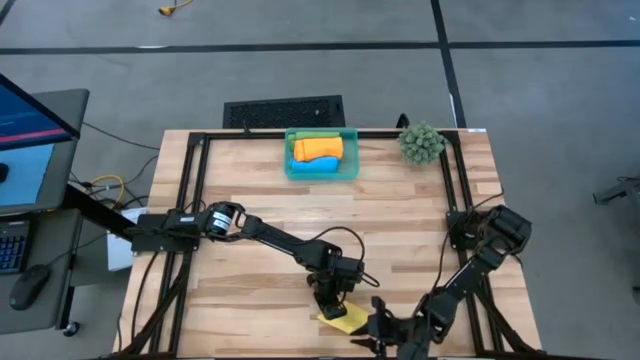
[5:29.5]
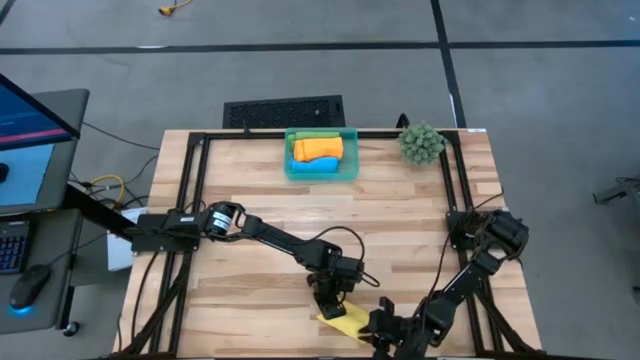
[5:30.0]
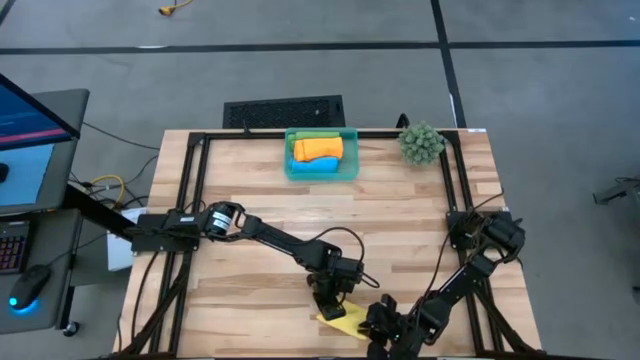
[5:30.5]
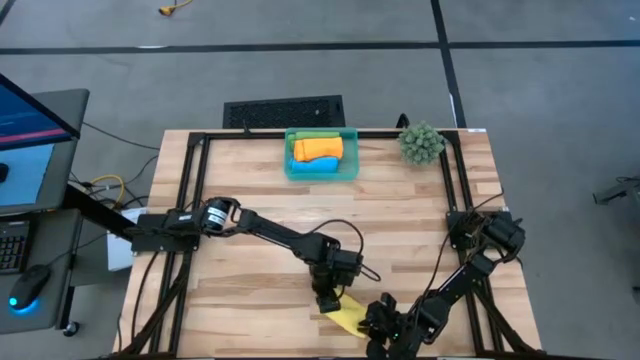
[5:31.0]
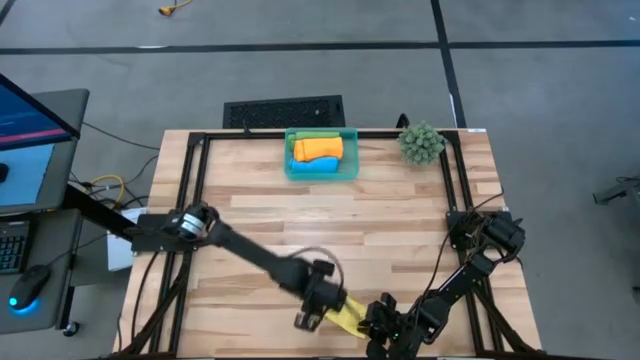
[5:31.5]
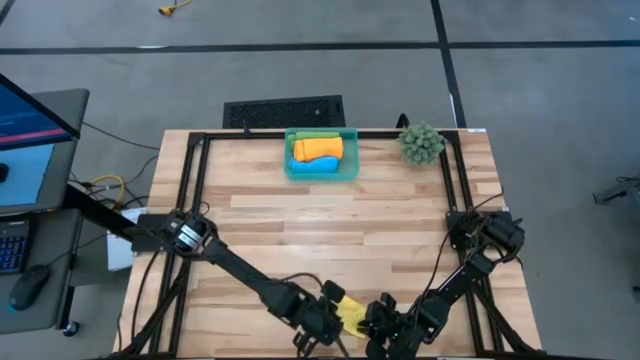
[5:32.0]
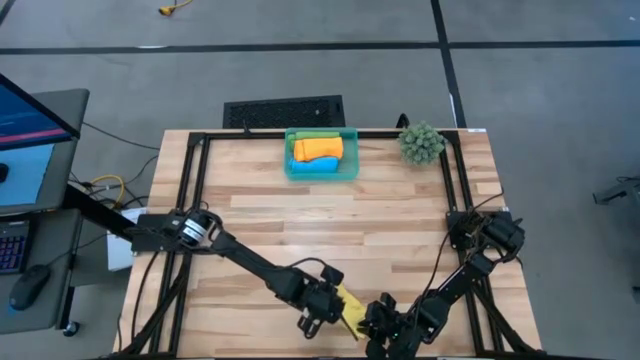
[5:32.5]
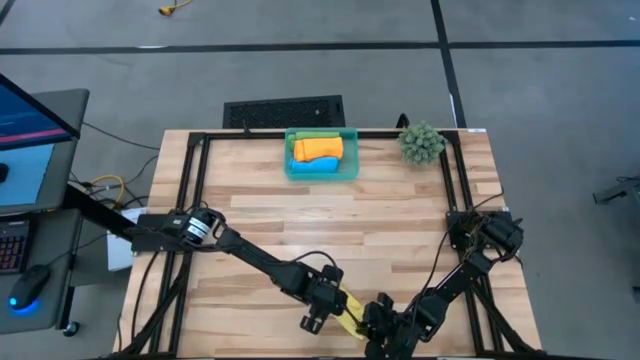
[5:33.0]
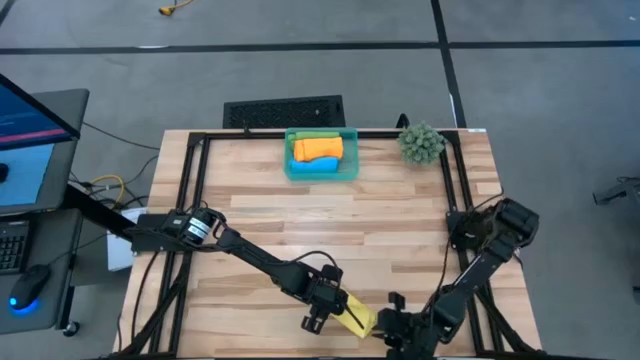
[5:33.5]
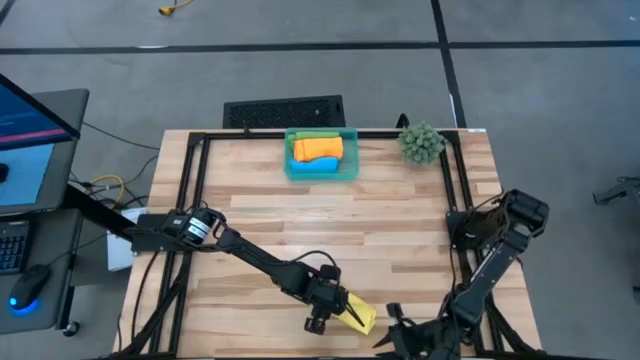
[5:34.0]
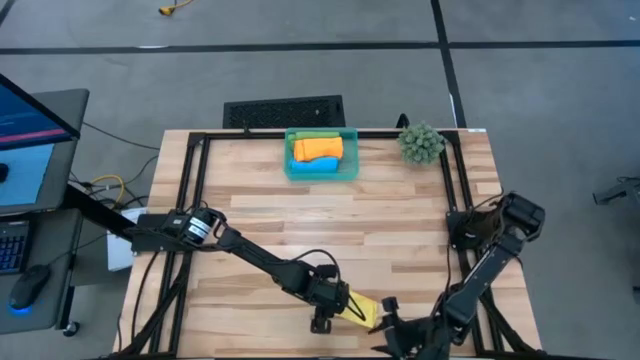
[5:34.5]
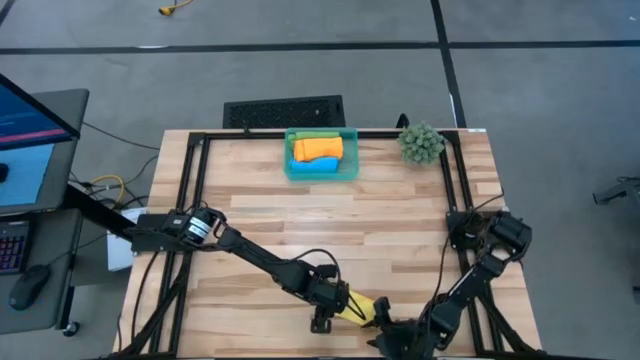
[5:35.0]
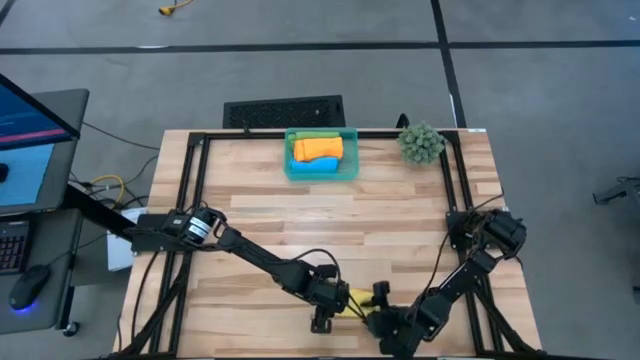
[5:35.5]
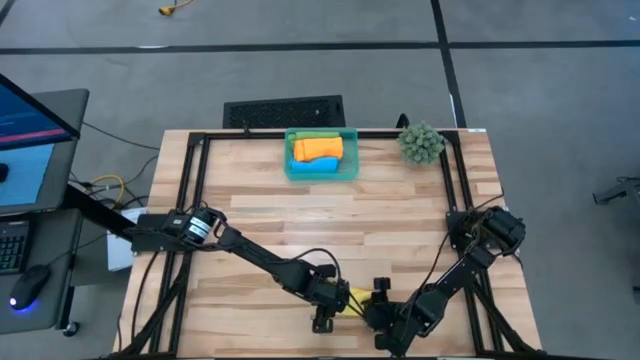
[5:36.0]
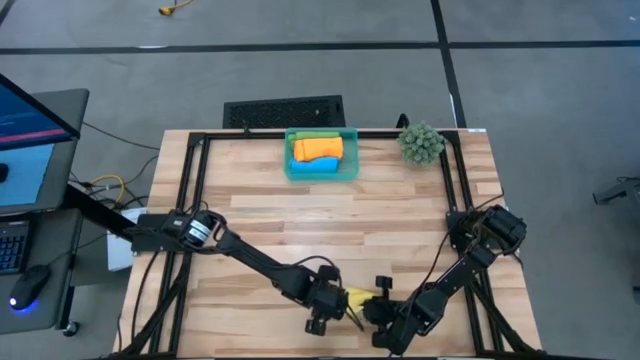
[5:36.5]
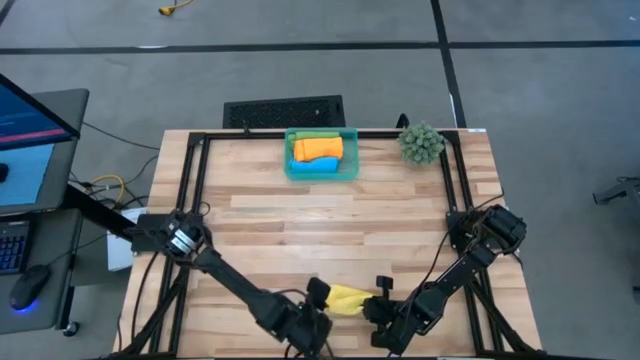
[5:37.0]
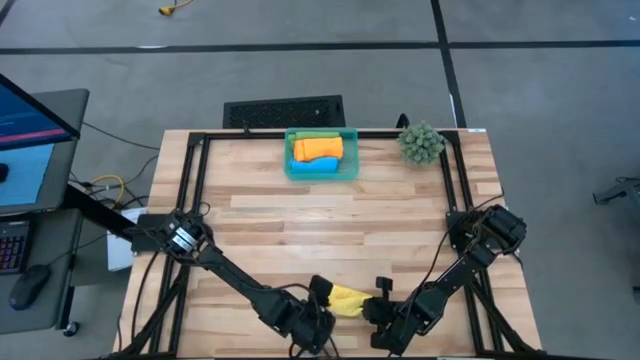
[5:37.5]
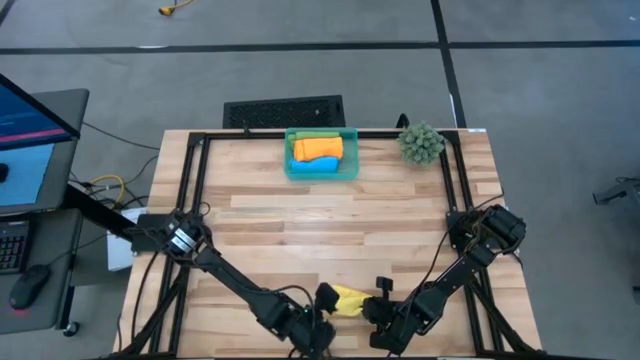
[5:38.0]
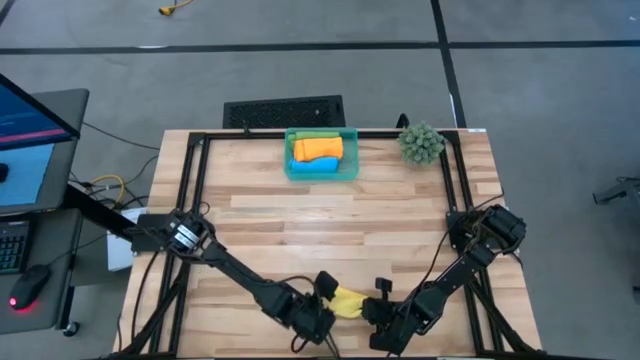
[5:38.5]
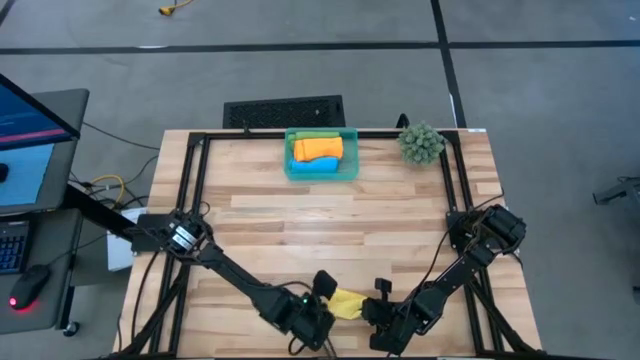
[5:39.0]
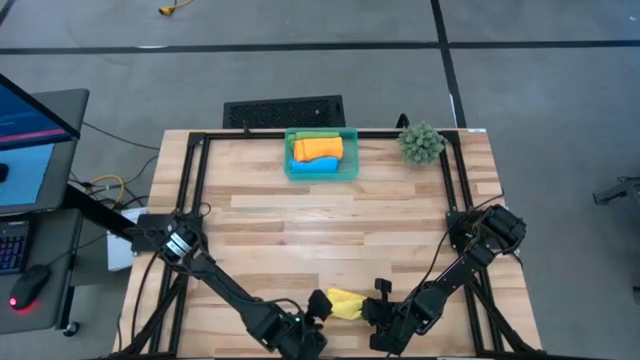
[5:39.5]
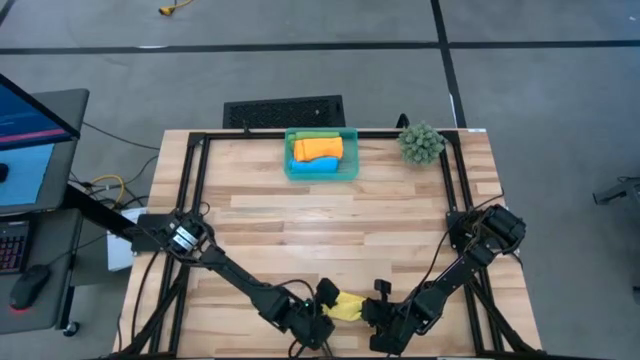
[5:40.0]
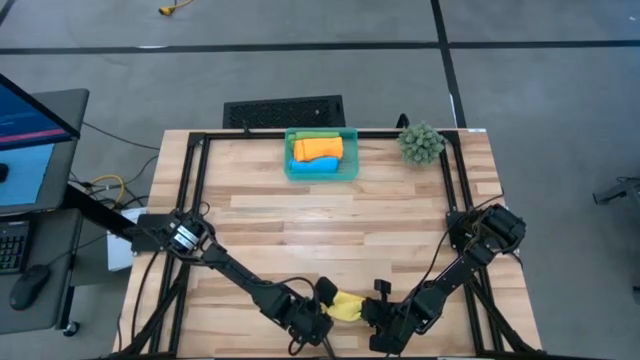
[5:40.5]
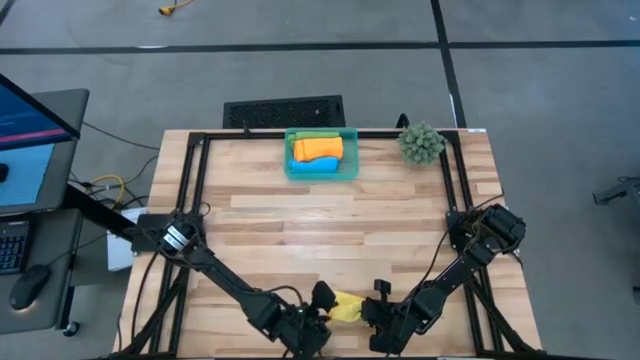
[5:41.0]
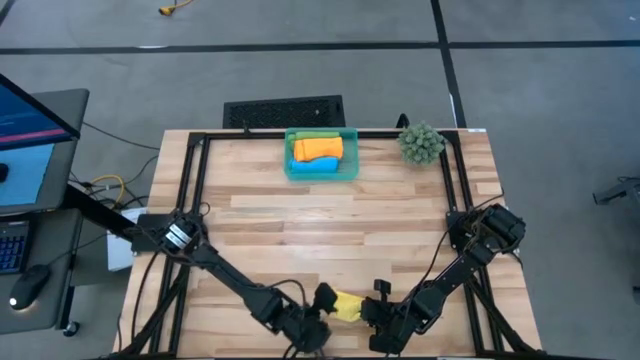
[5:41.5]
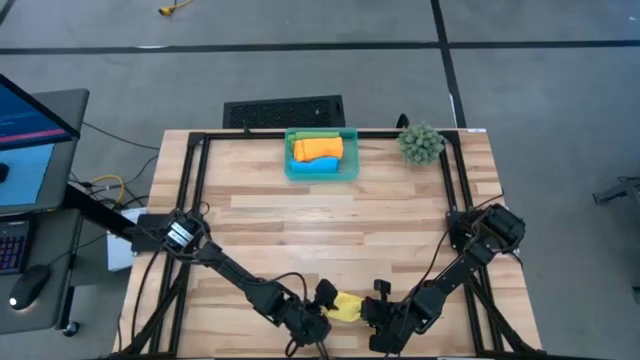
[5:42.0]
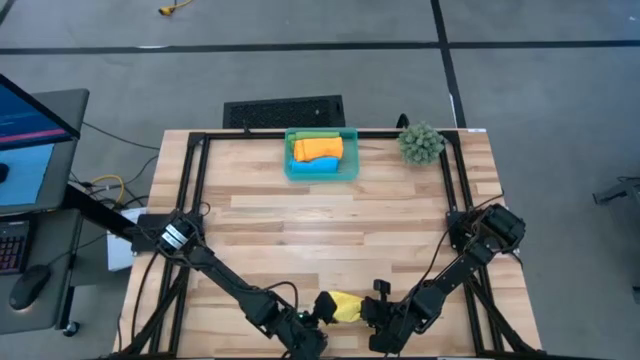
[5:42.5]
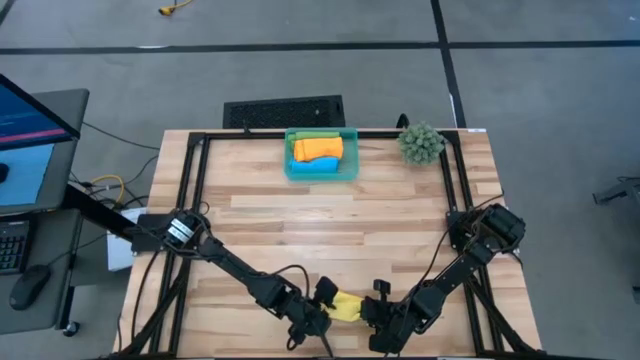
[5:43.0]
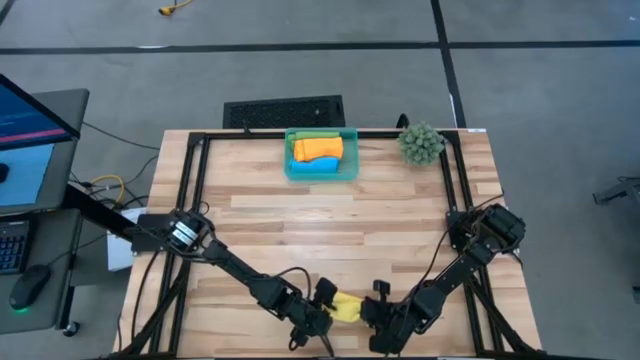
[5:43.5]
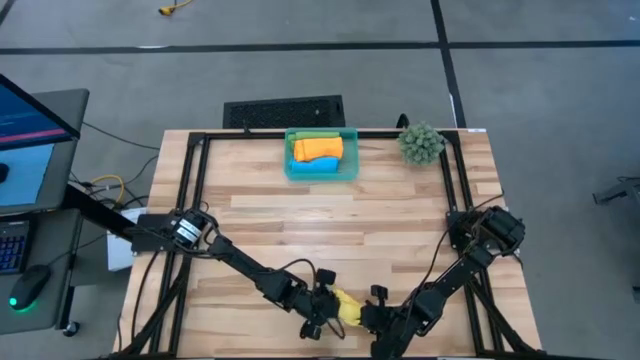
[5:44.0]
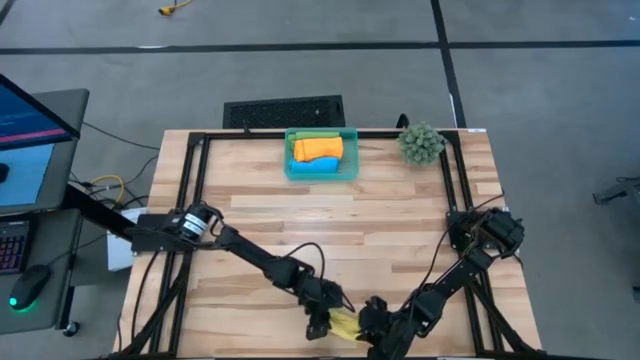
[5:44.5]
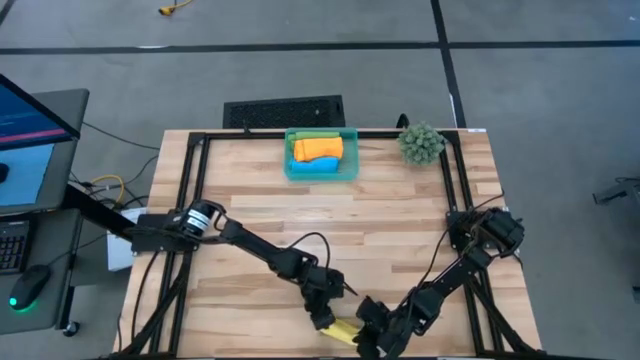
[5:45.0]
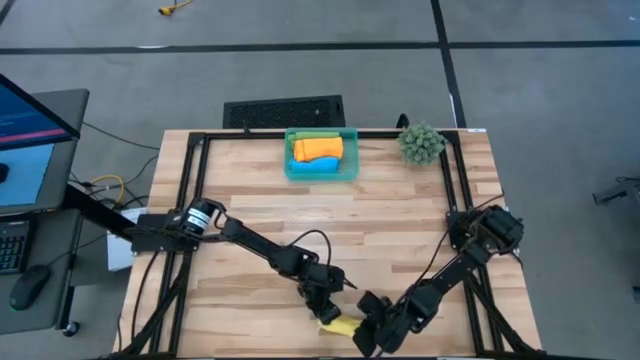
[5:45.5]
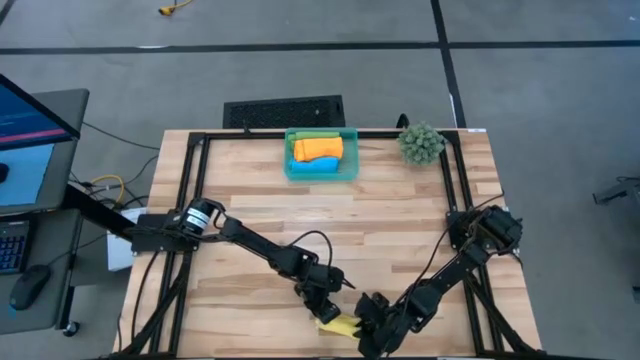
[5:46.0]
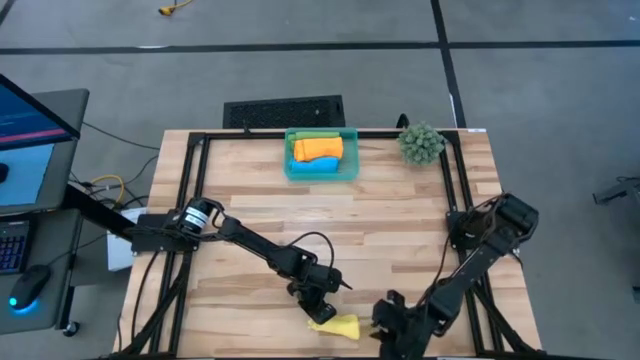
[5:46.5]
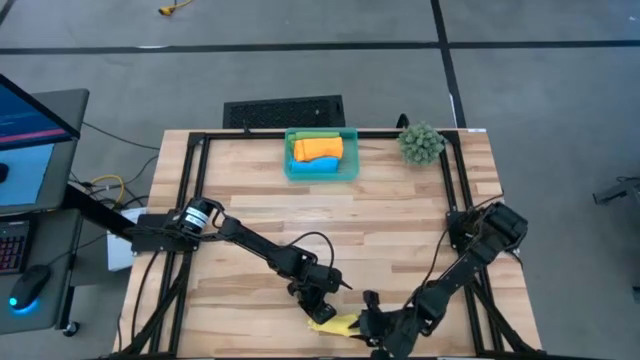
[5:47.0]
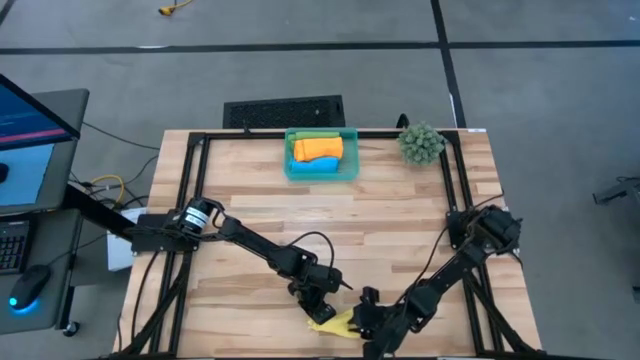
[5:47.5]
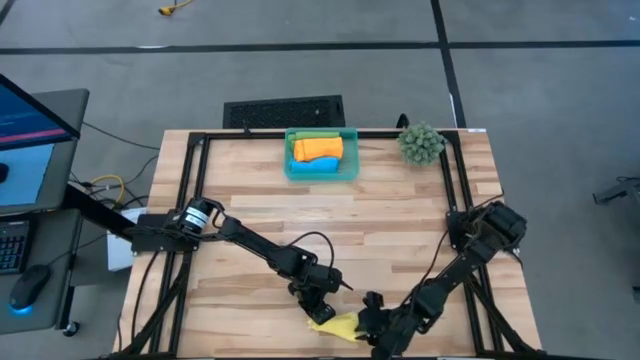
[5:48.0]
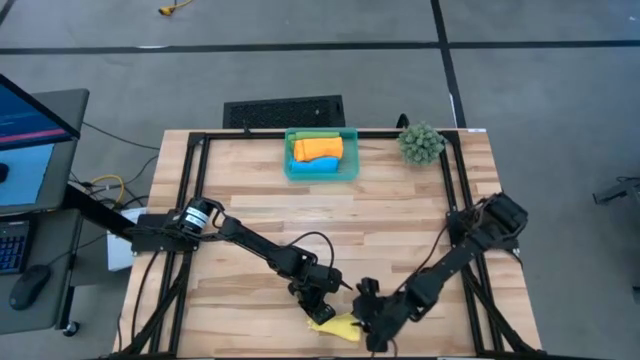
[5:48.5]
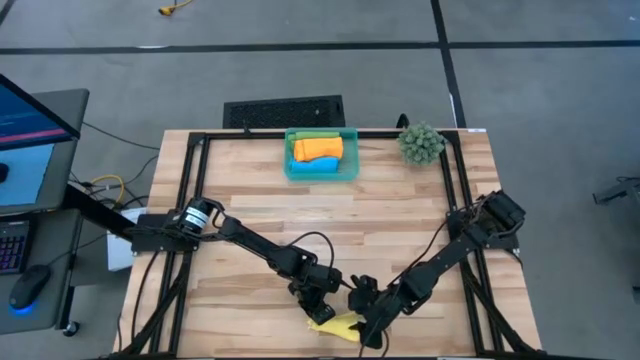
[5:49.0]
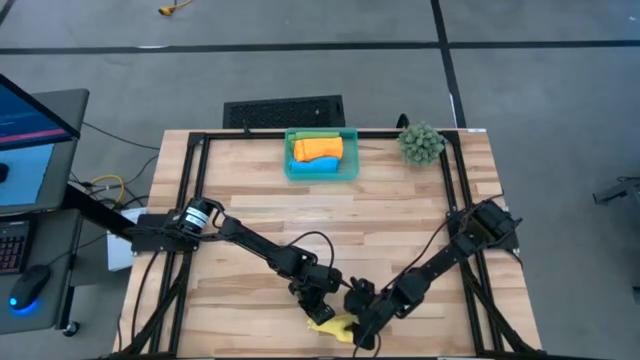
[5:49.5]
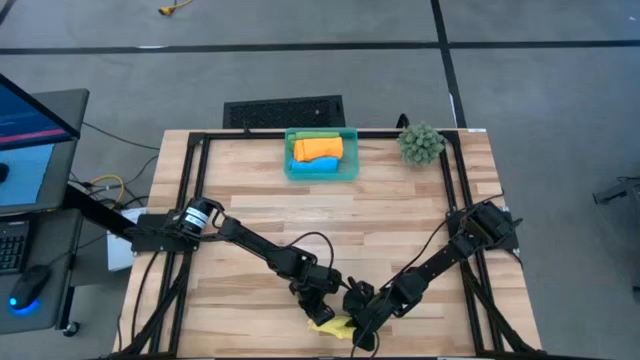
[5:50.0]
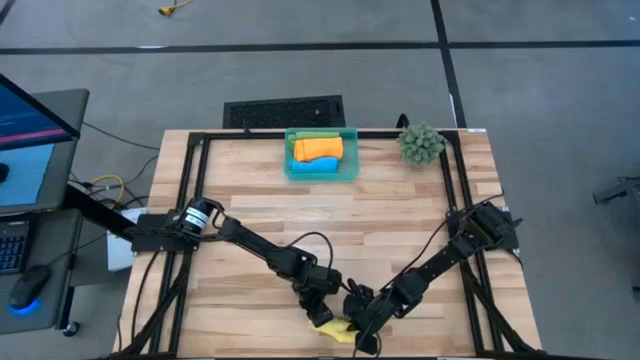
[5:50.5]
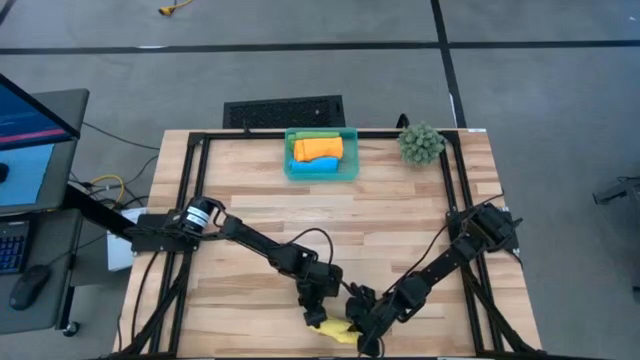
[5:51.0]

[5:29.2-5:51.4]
Task: Roll microfiber towels into tight, uniform cylinder then place into a basket
Roll the yellow towel
